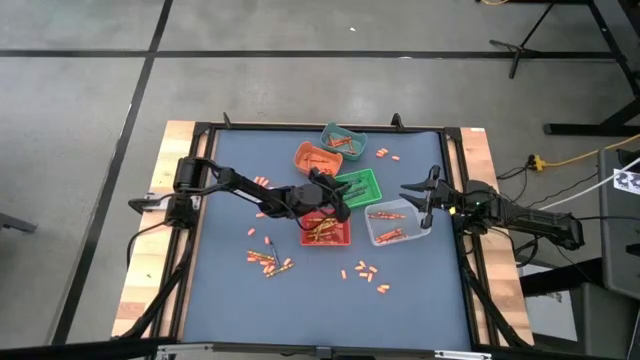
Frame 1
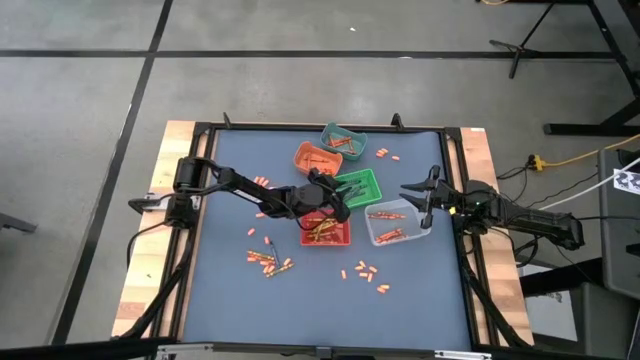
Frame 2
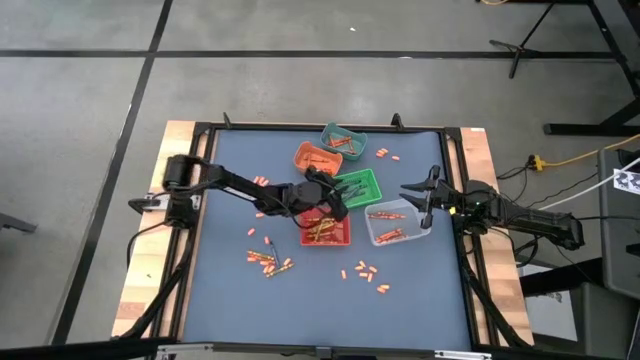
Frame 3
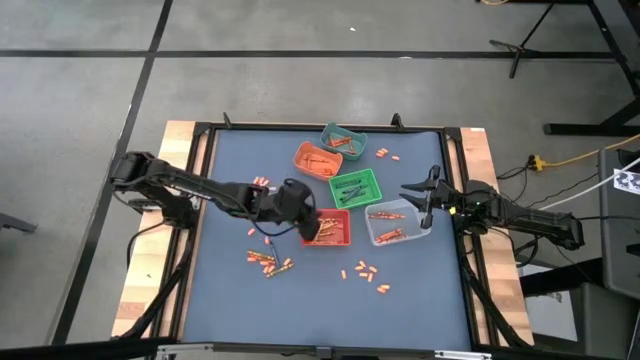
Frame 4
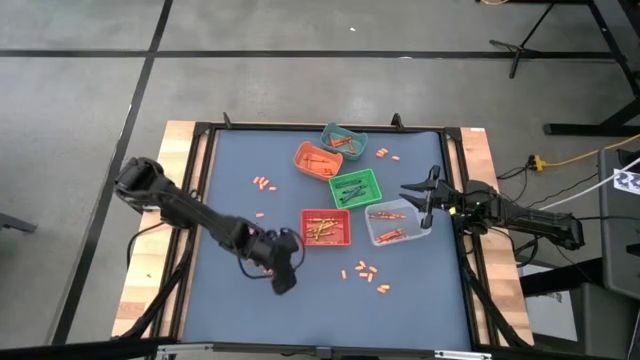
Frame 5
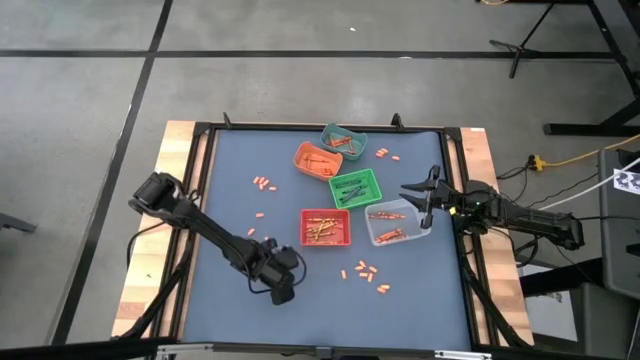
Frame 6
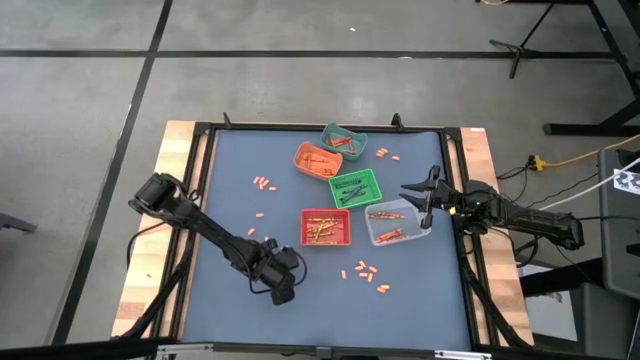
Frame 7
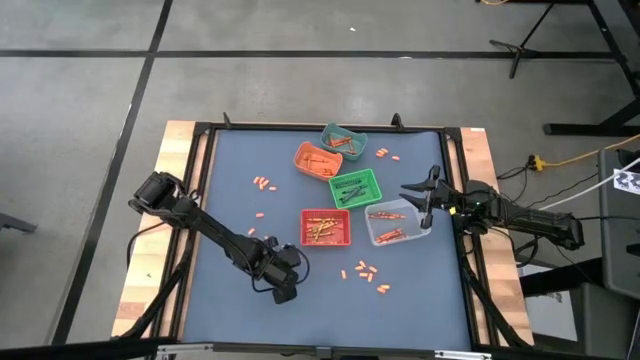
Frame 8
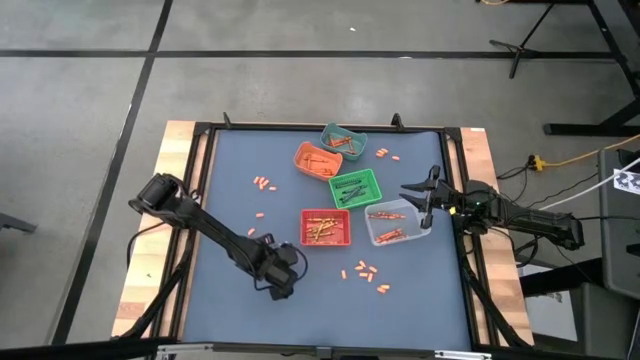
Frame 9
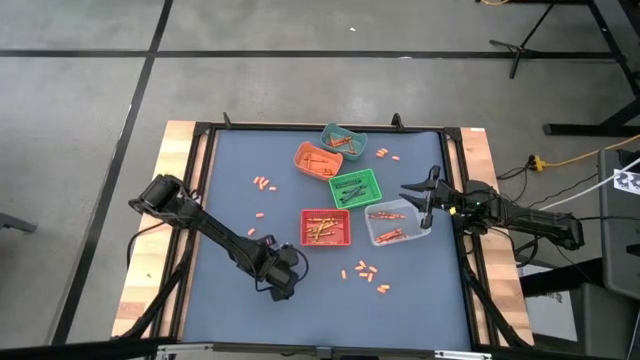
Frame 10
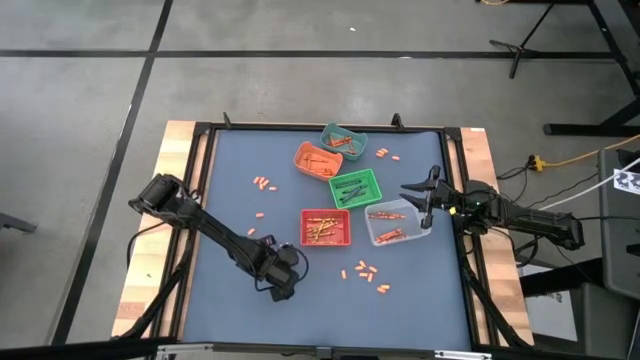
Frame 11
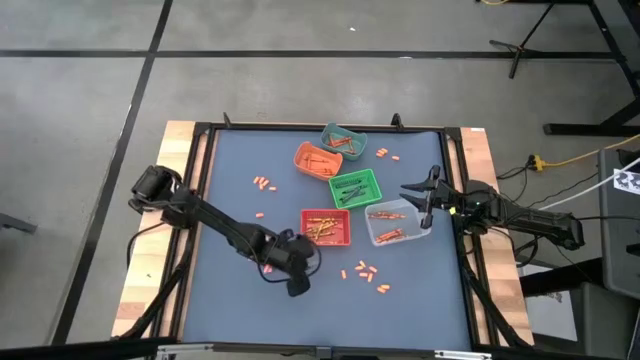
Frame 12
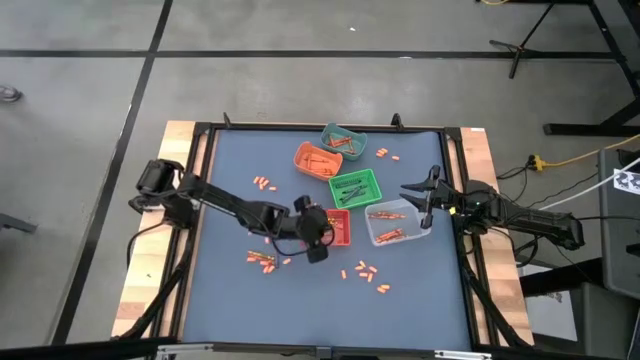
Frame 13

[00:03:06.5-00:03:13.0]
Task: Sort crayons
Put the yellow crayon into the red bin

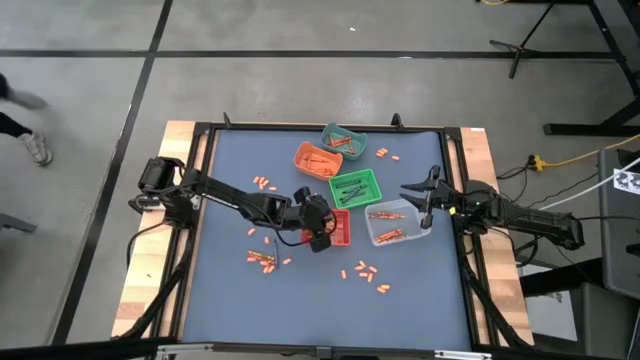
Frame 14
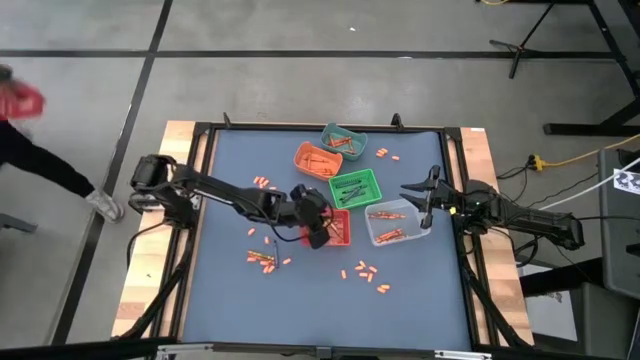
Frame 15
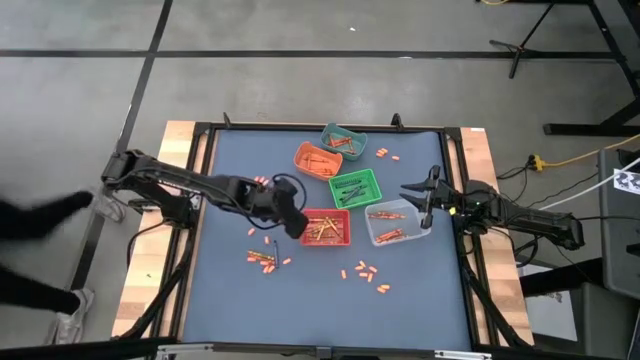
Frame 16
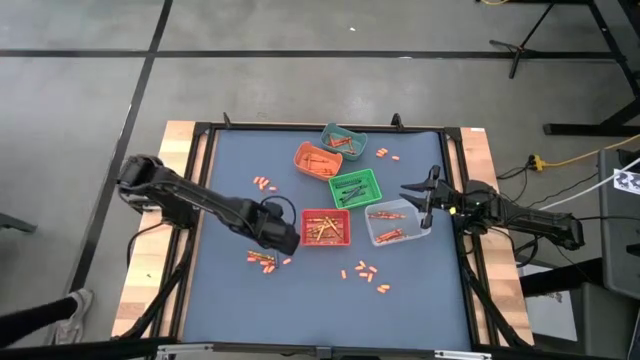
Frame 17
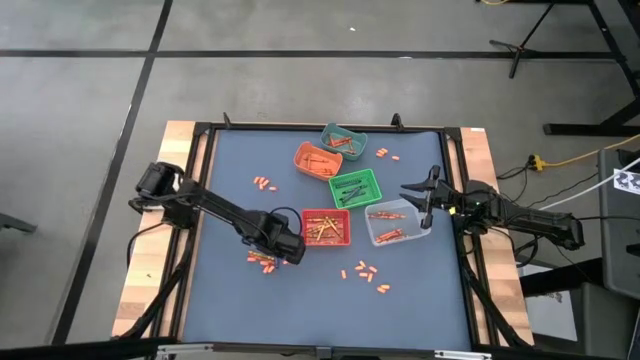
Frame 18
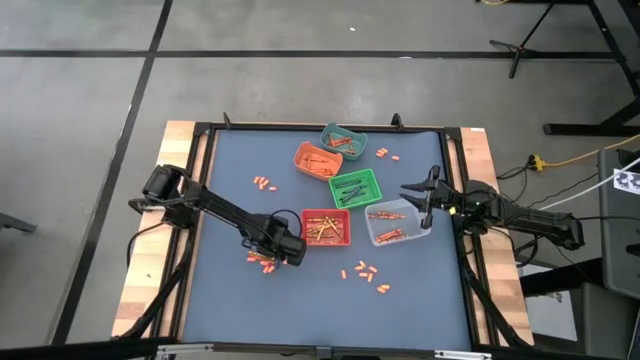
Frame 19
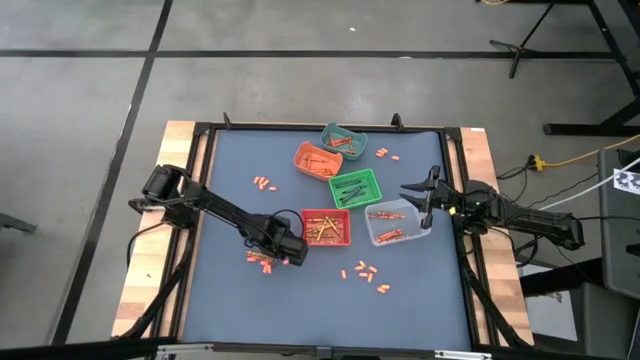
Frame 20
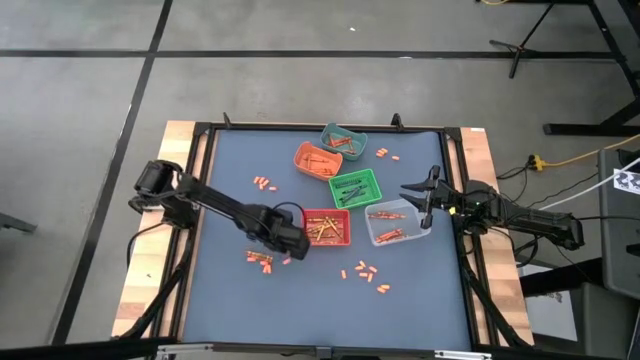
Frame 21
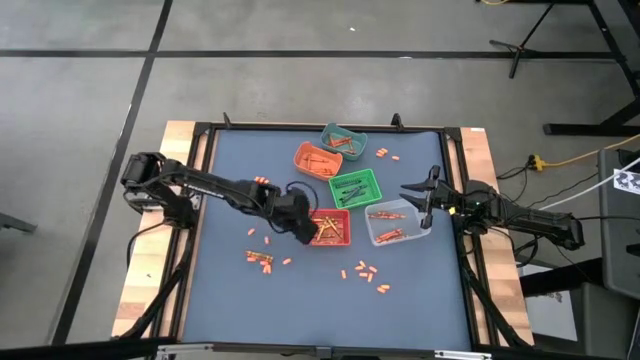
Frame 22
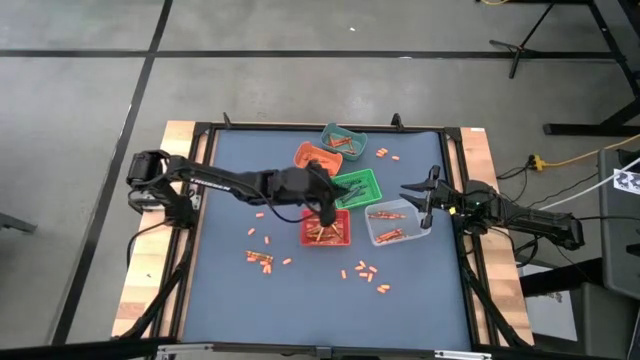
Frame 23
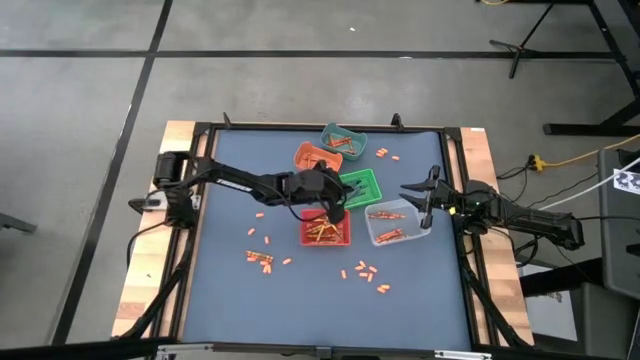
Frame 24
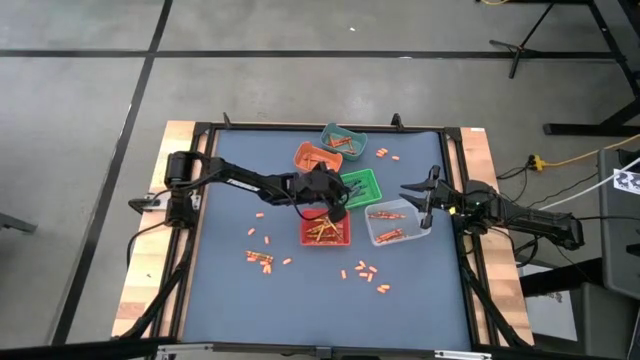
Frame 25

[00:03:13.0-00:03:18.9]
Put the blue crayon into the green bin

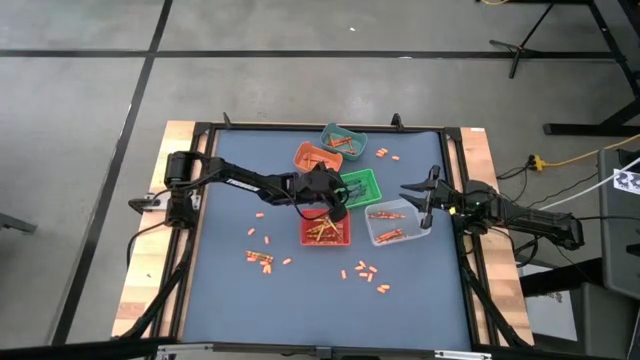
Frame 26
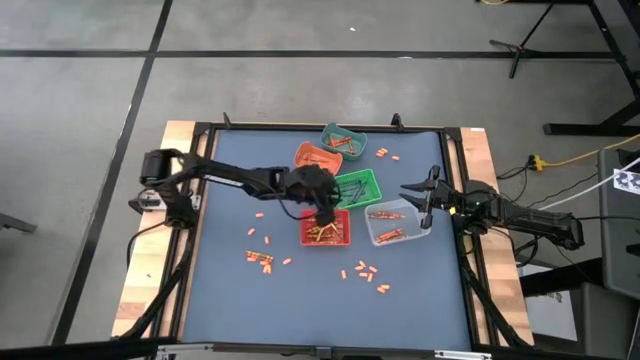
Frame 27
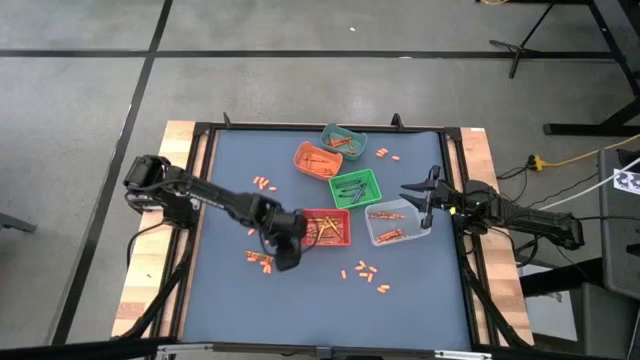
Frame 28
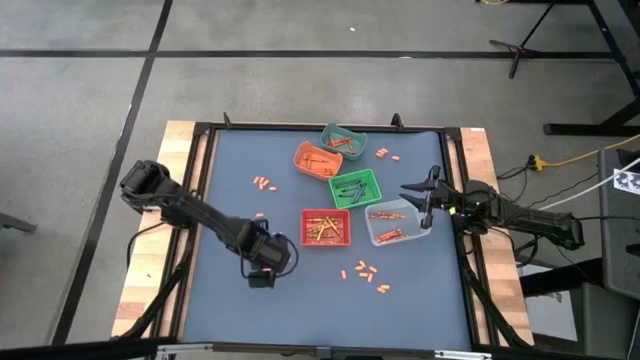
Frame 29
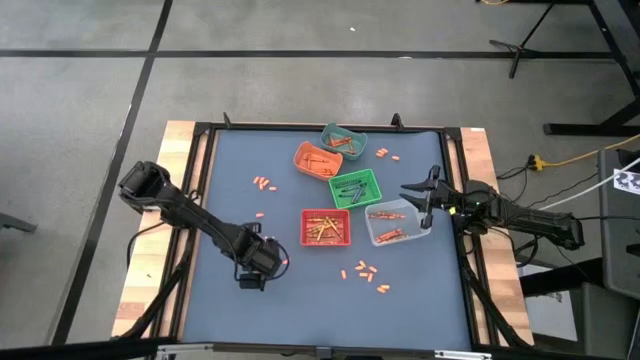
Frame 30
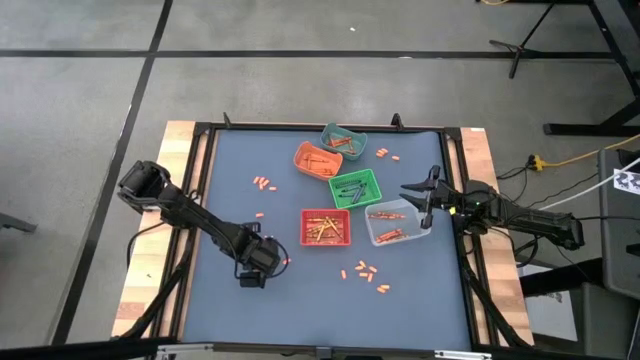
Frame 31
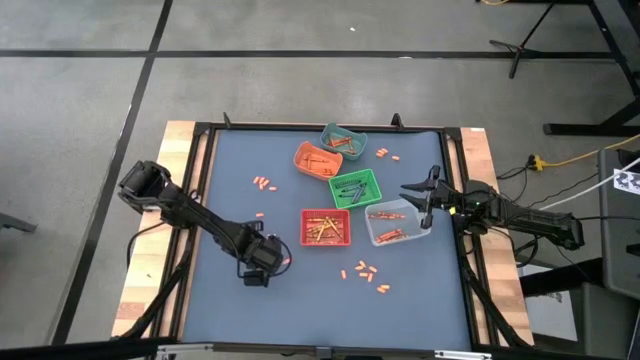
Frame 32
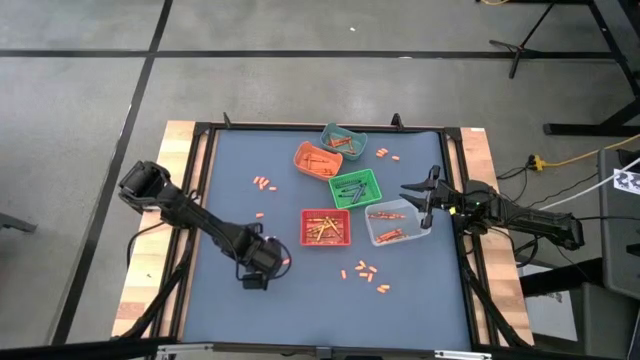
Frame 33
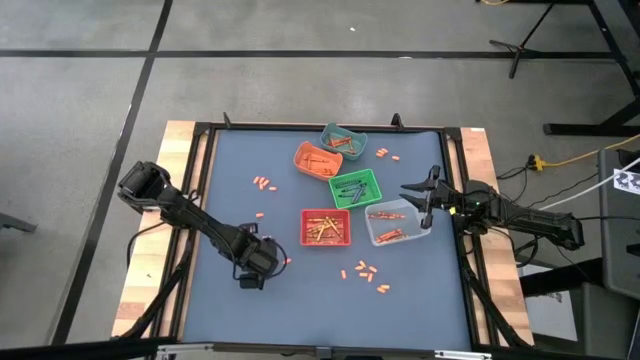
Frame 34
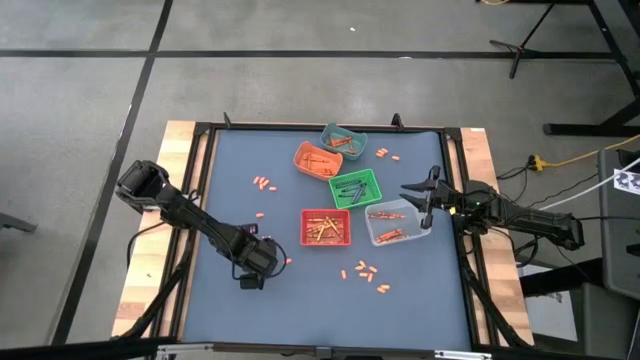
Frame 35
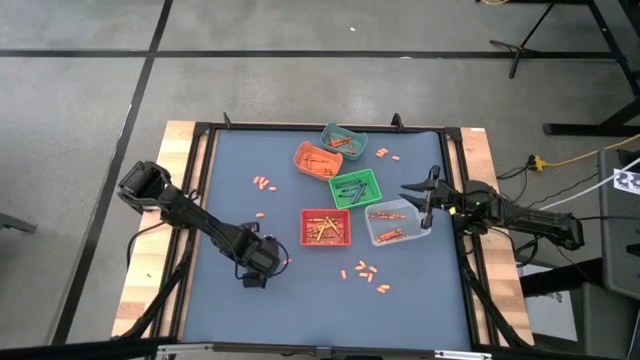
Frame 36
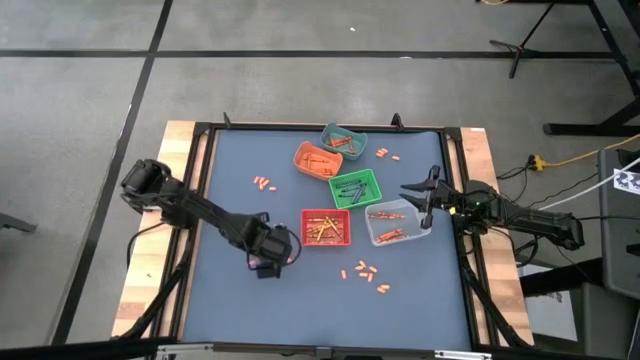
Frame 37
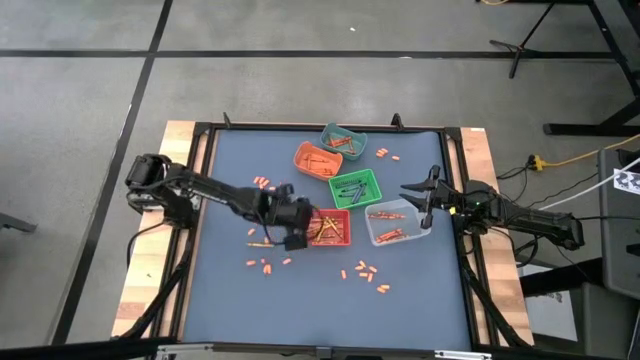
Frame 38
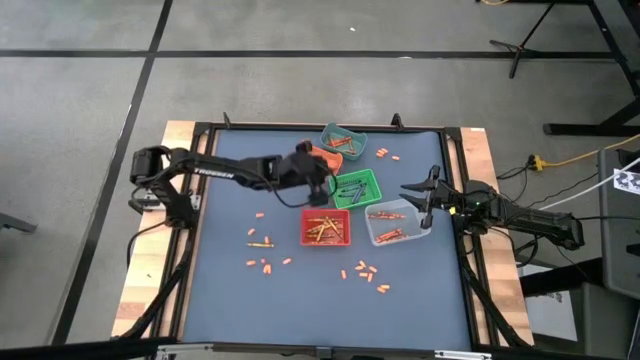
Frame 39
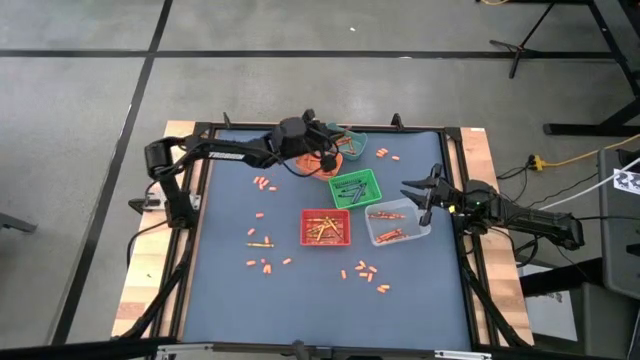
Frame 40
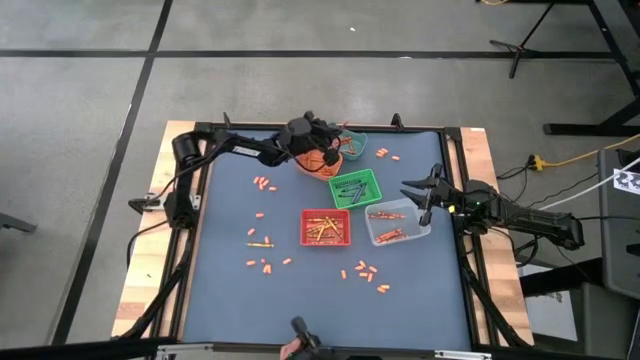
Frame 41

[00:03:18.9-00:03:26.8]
Put the red orange crayon into the blue bin

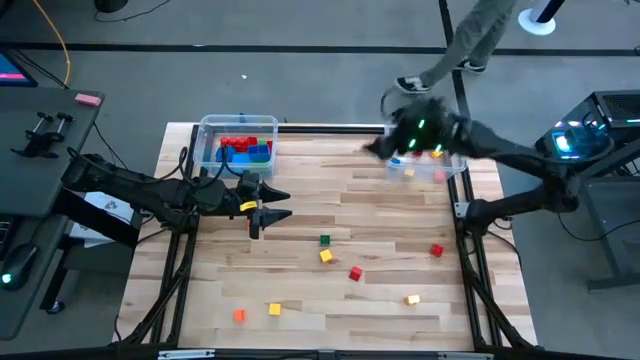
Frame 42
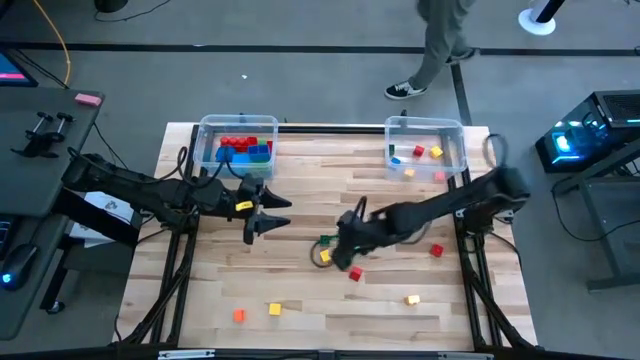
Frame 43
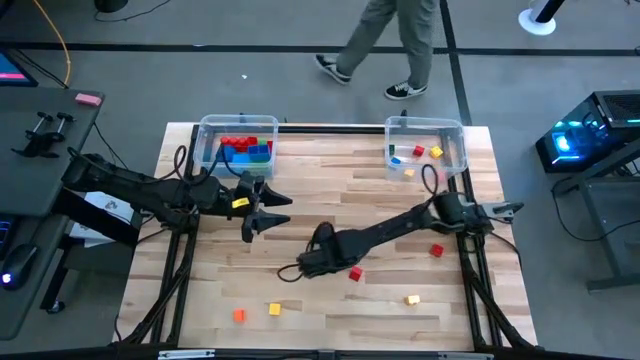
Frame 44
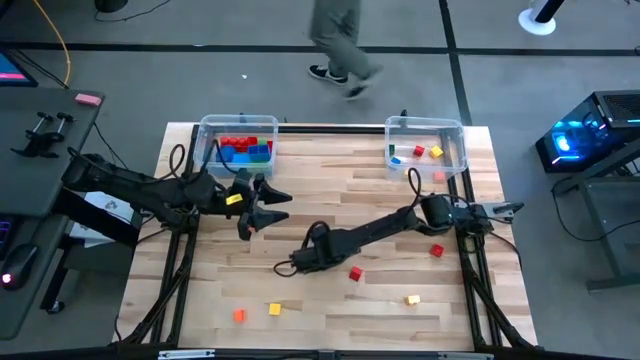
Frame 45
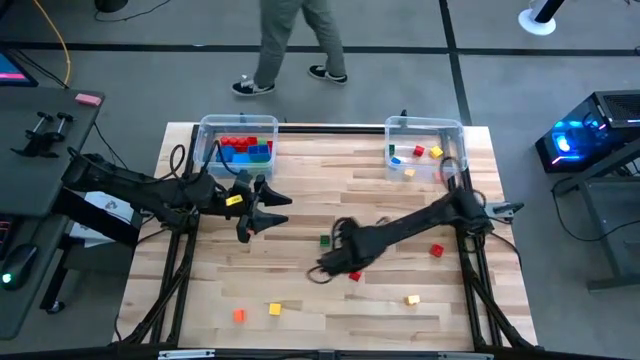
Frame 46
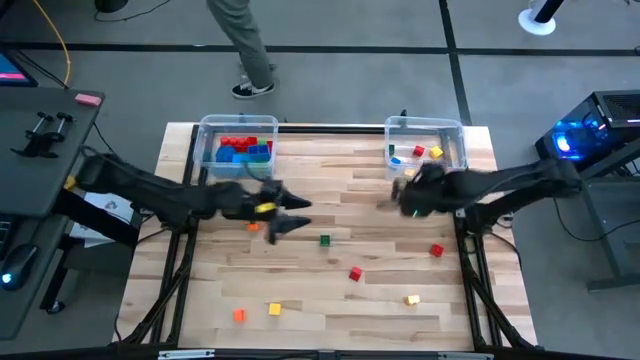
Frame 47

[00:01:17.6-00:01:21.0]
Task: Sort blocks by size
Put the small block into the right transparent bin
